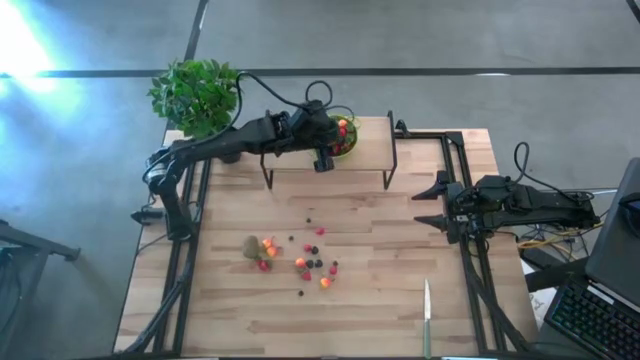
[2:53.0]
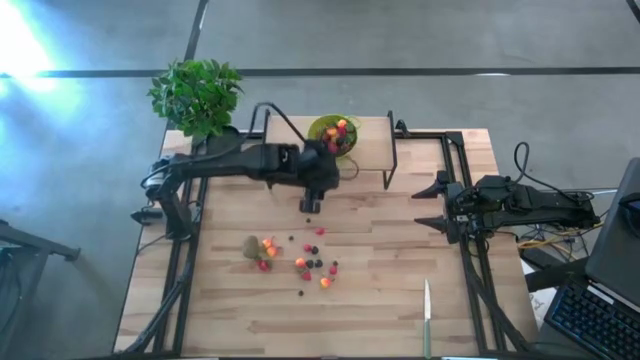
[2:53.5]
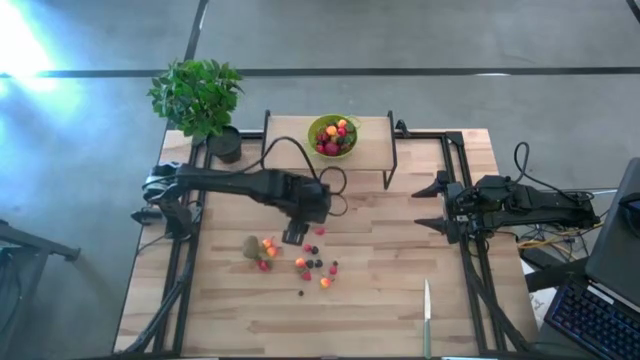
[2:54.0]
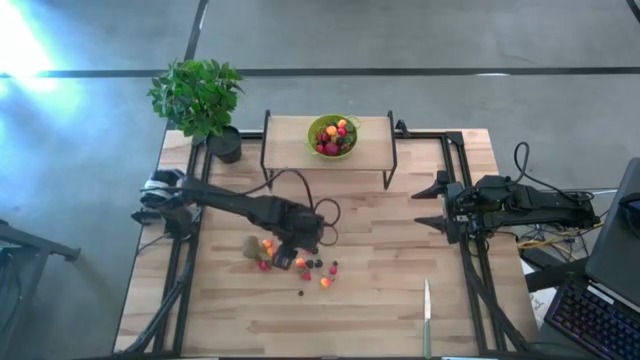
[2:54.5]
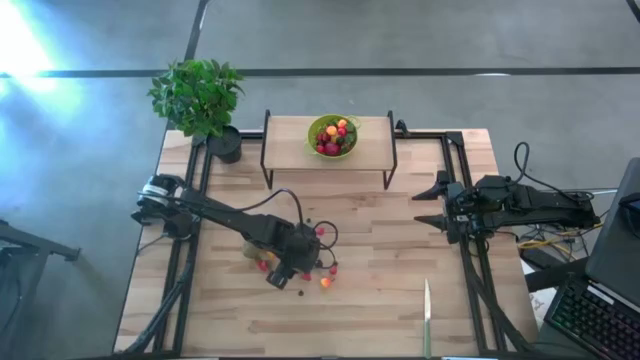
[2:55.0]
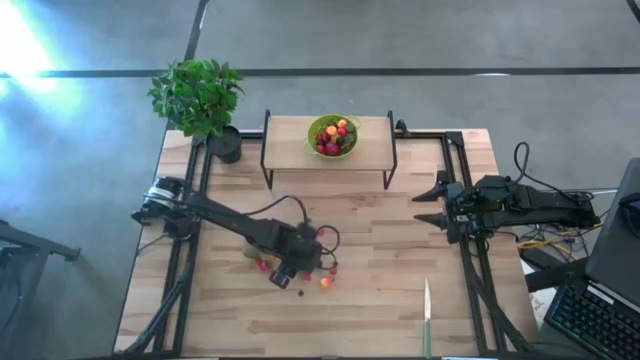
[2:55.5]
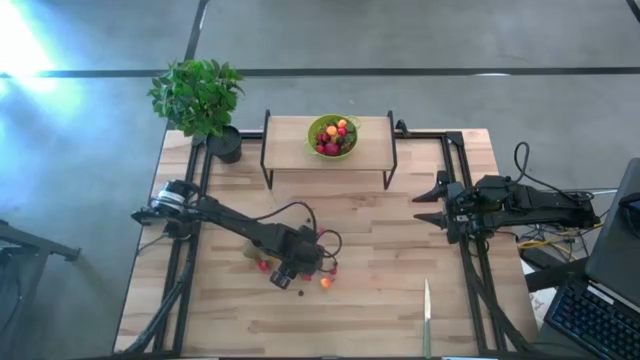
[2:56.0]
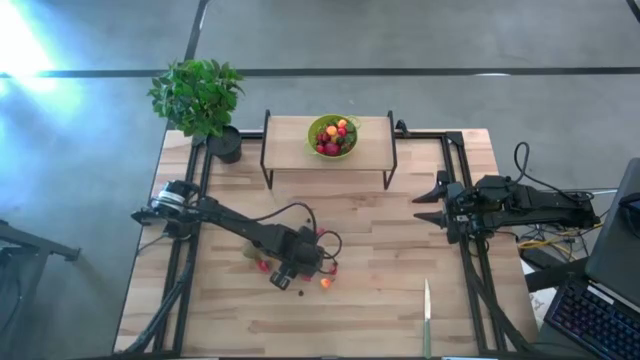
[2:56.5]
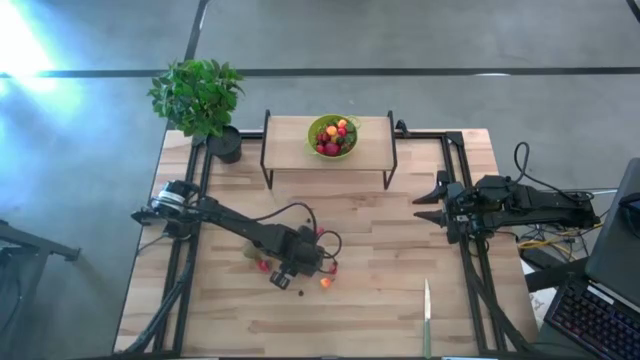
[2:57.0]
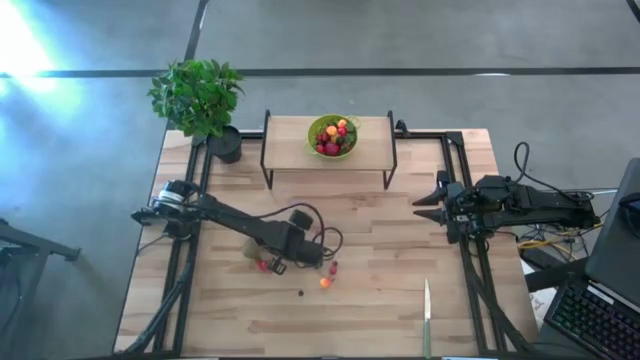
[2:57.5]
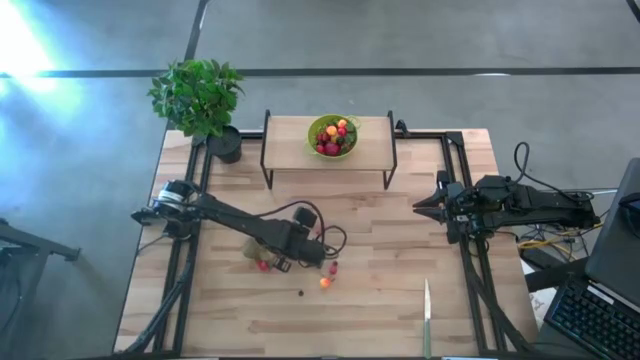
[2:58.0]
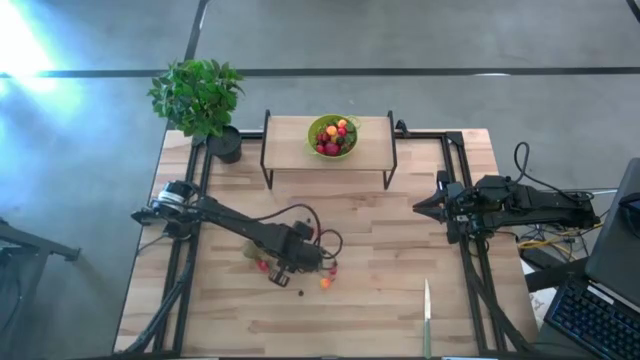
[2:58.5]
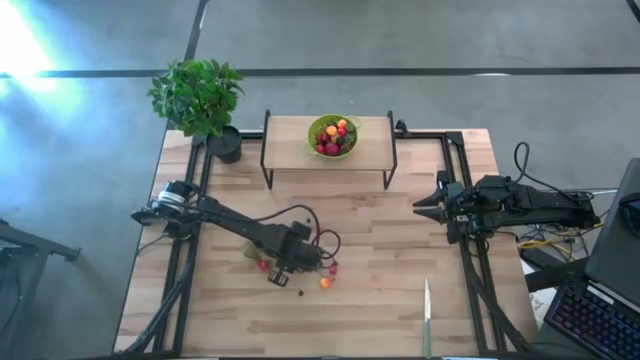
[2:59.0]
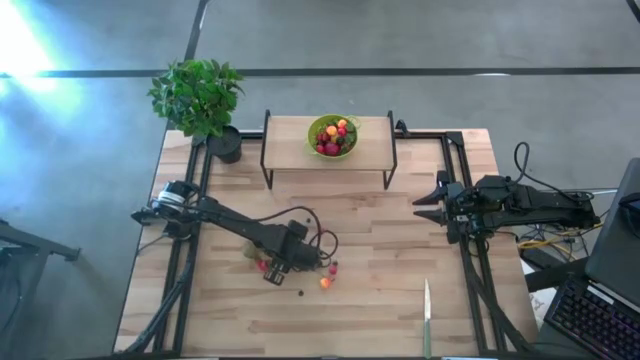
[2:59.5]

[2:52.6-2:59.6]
Task: Pick & Place Fruit
Put the yellow peach into the green strainer bowl on the shelf

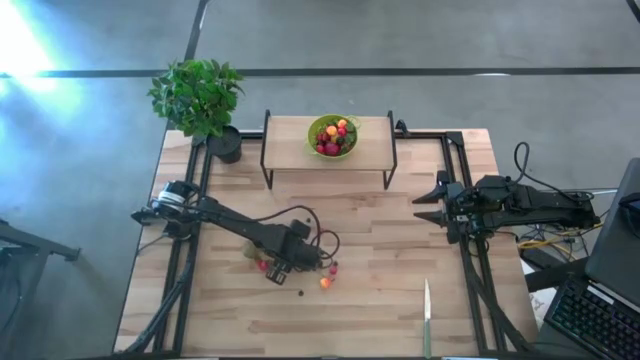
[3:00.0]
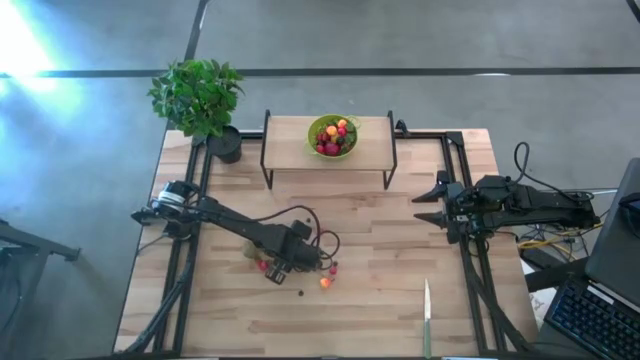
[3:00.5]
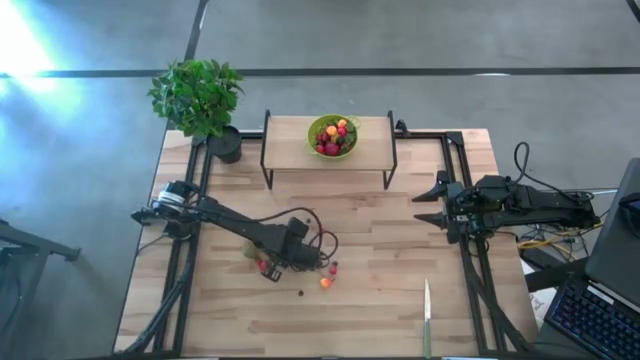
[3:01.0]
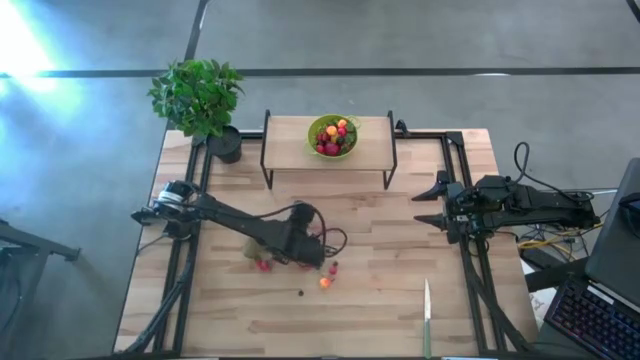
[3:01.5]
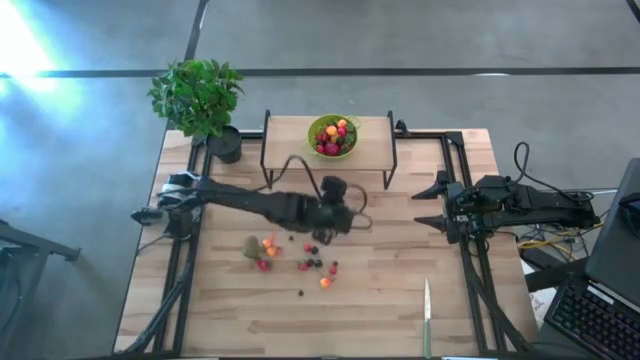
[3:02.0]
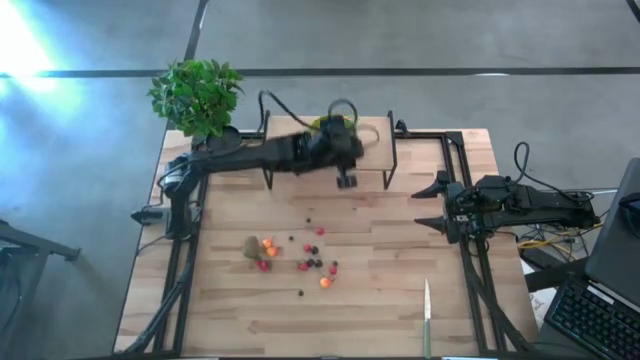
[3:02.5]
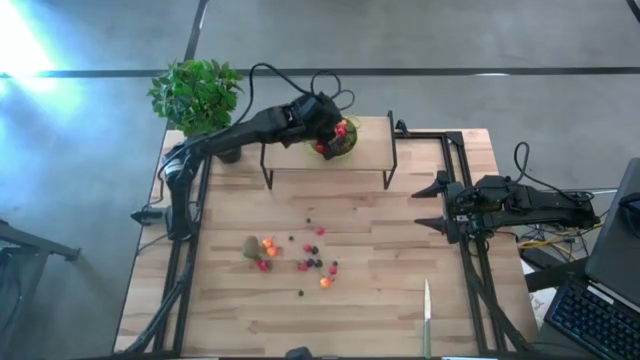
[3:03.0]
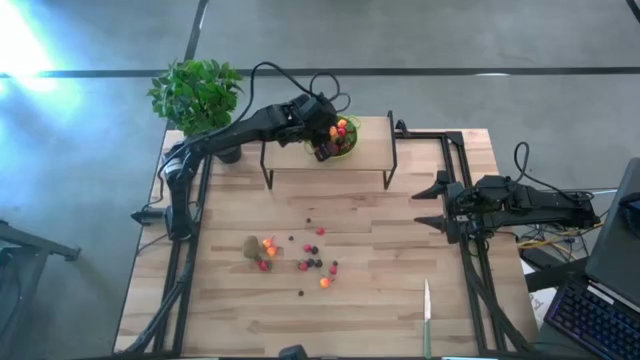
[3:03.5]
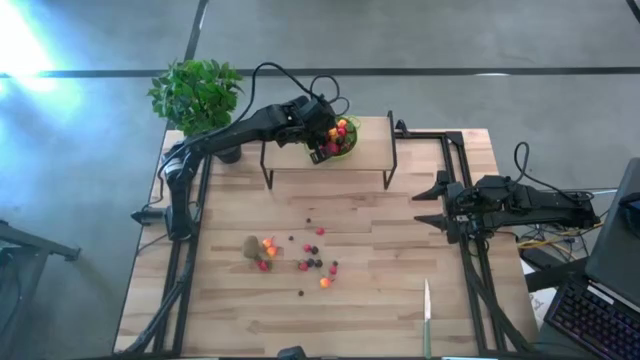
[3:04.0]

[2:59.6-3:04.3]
Put the yellow peach into the green strainer bowl on the shelf

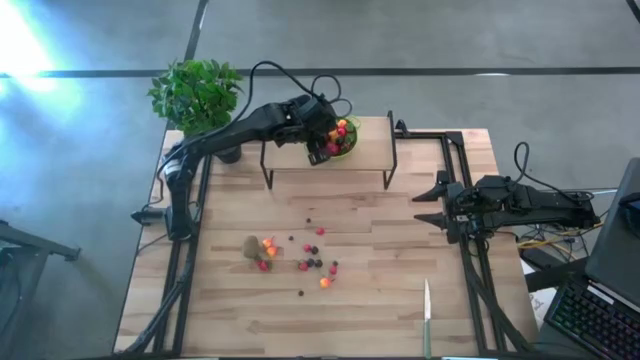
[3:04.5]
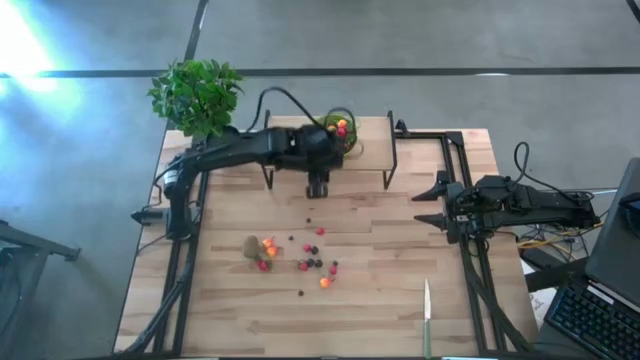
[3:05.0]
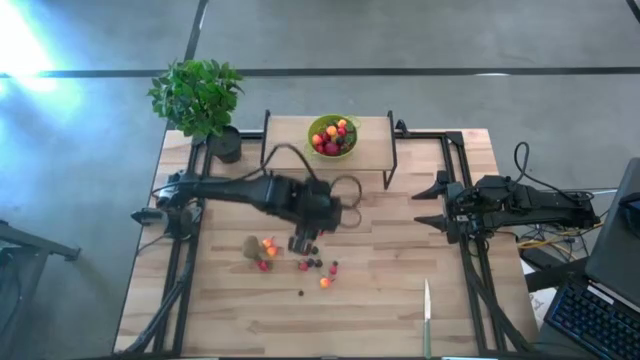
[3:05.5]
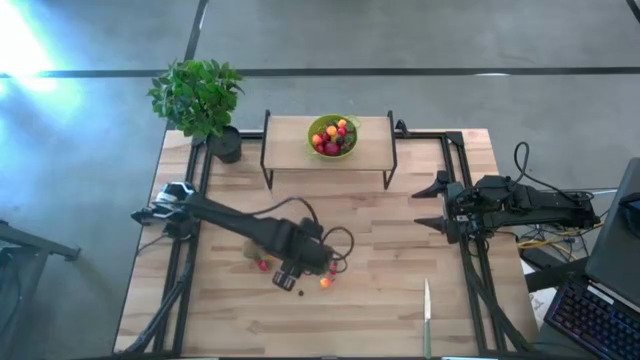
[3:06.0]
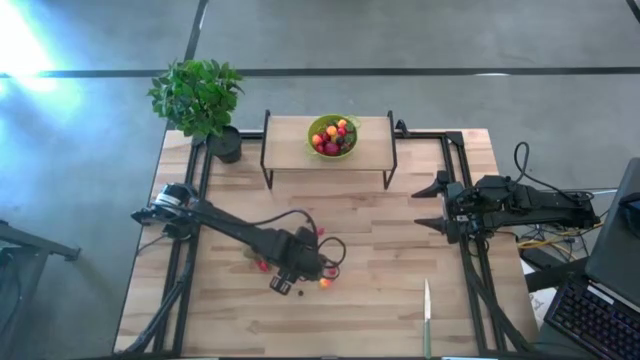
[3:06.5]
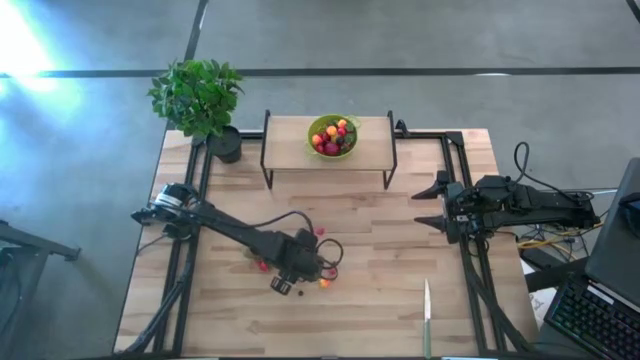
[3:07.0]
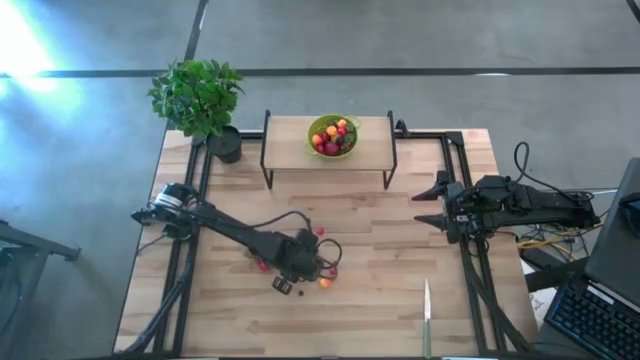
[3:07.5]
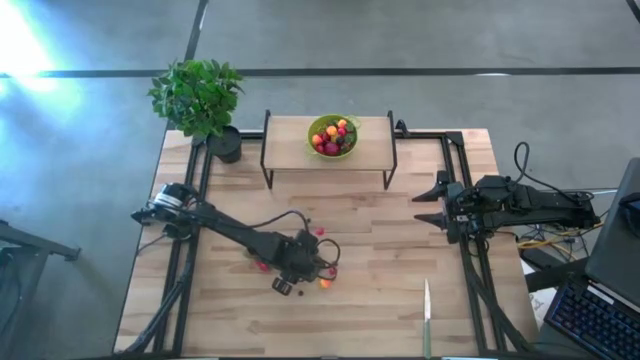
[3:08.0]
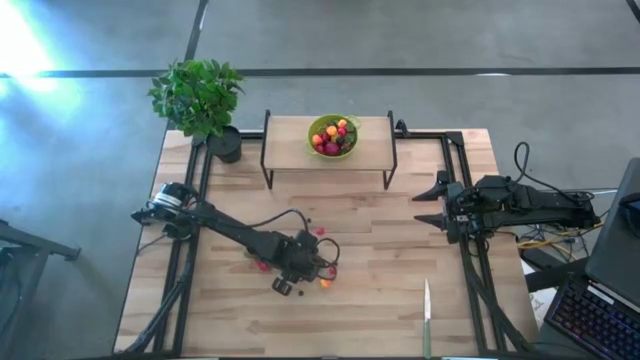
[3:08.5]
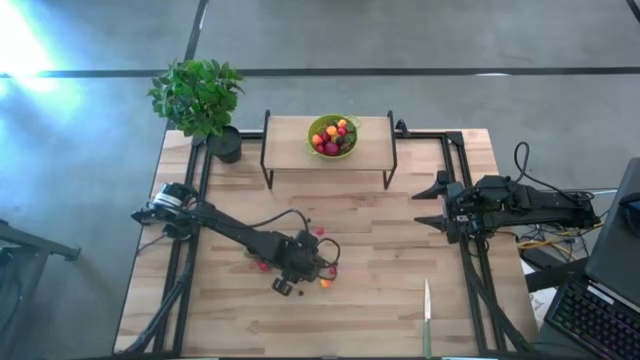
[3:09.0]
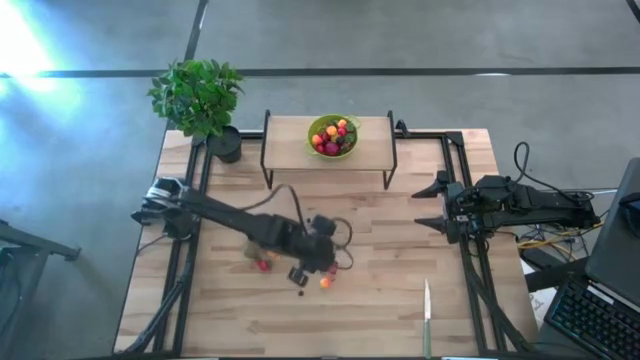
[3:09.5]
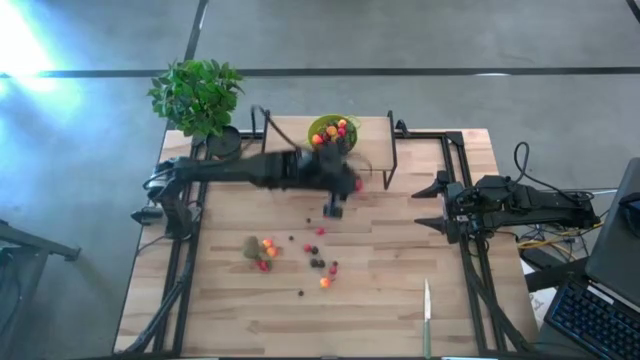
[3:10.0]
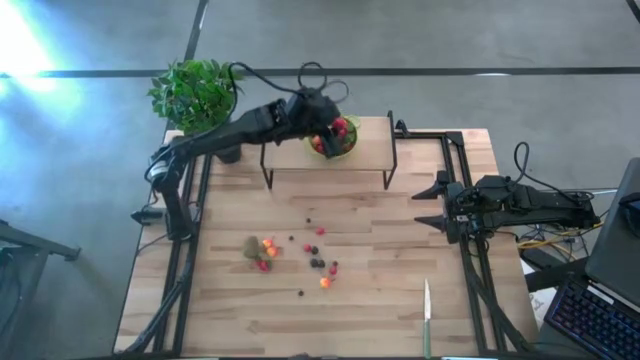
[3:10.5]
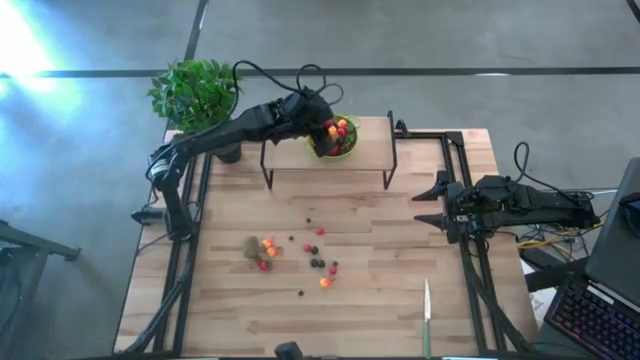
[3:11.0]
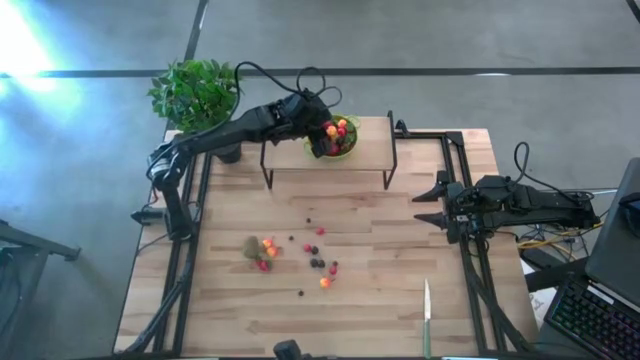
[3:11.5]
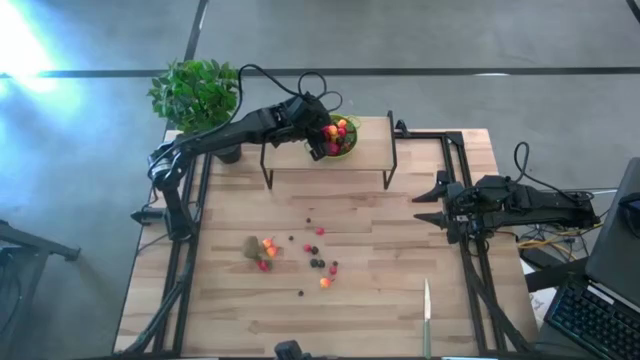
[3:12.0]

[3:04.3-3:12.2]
Put the red strawberry into the green strainer bowl on the shelf

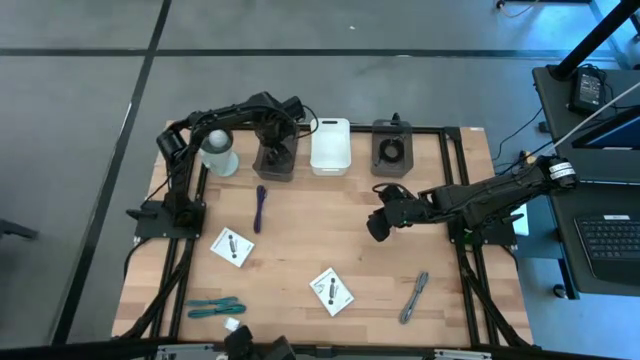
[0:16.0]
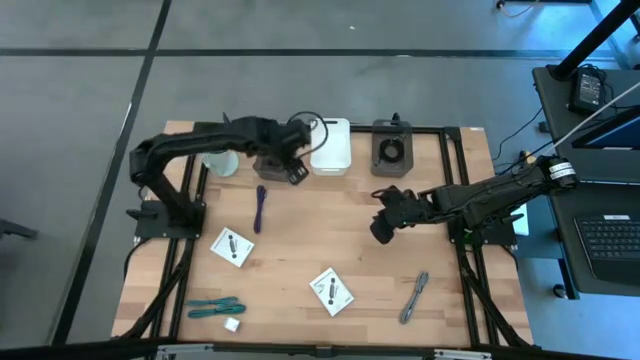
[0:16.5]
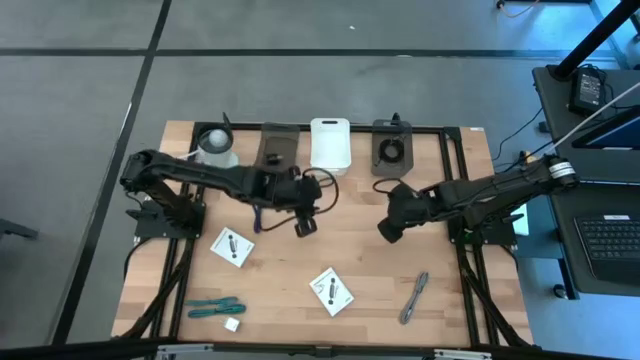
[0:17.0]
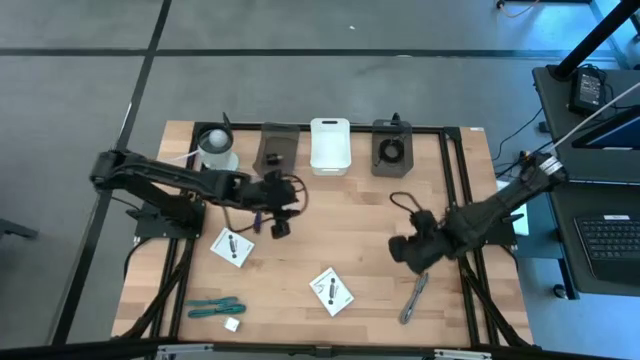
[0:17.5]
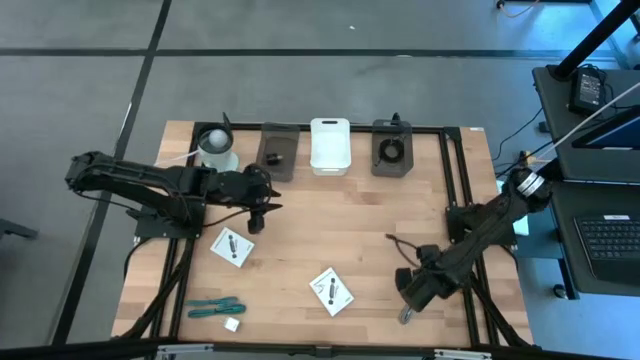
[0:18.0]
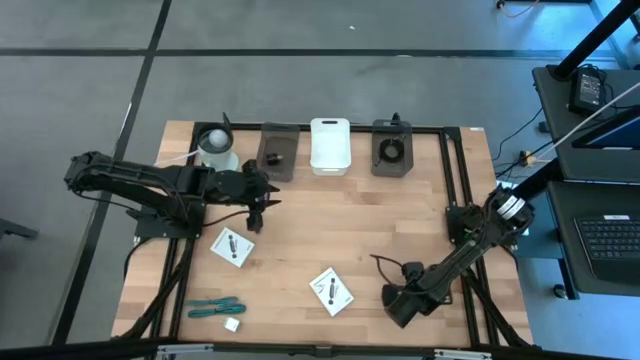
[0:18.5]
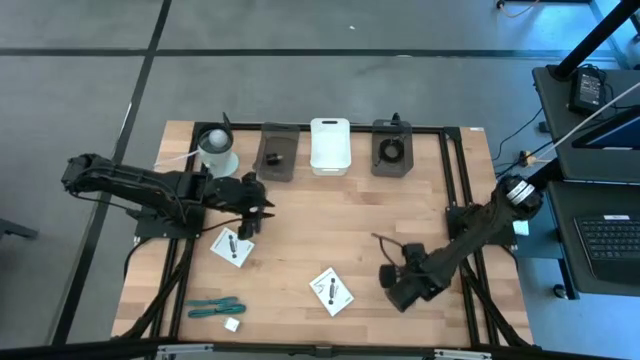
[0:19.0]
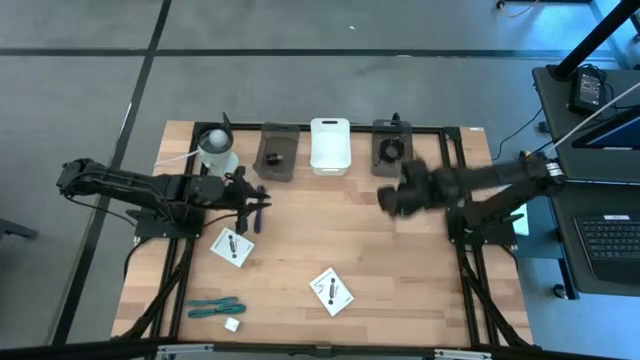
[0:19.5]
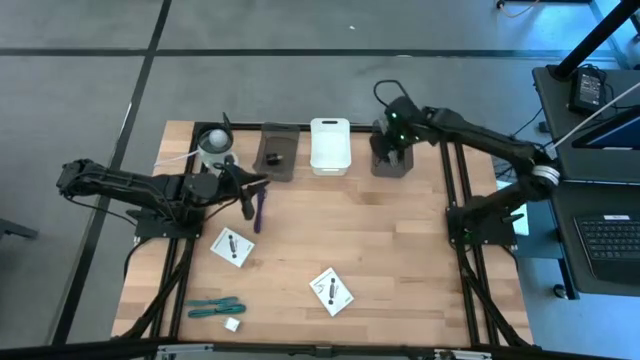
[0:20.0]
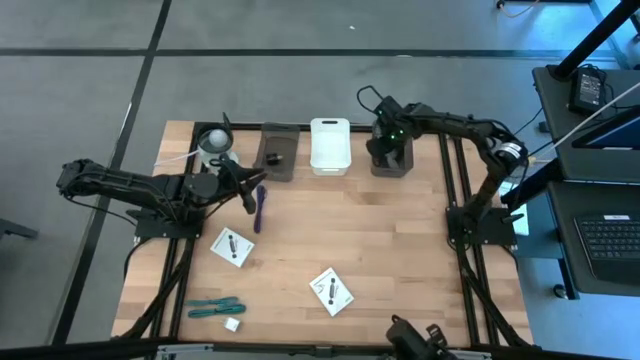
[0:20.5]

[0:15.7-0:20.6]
Task: Pick and place items into bin
Put the gray charger cable into the right black bin
